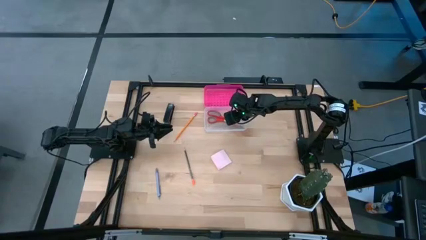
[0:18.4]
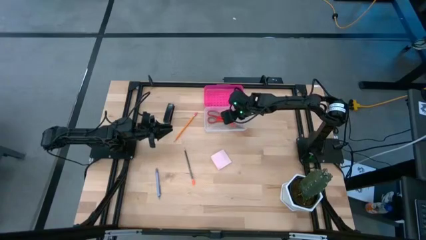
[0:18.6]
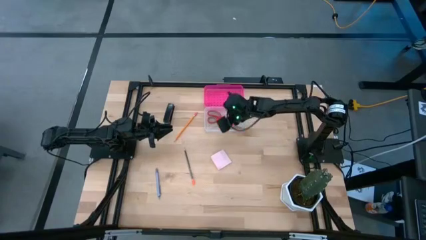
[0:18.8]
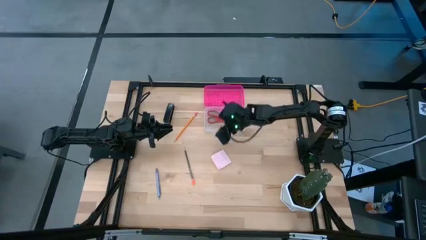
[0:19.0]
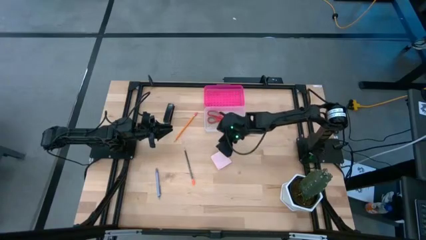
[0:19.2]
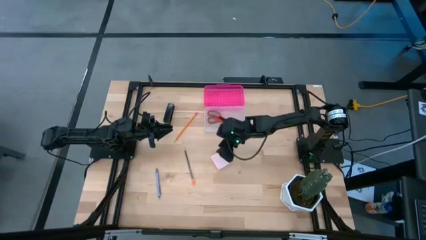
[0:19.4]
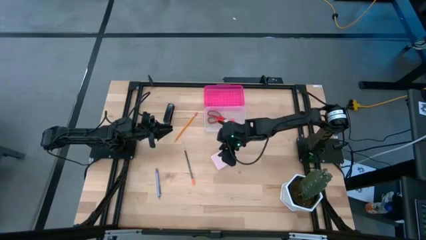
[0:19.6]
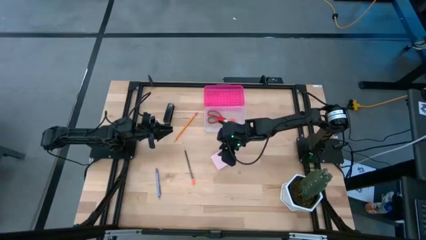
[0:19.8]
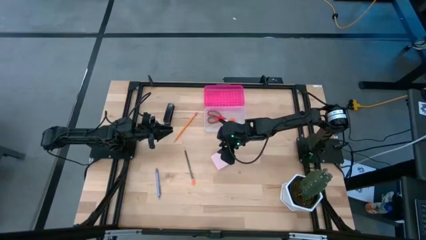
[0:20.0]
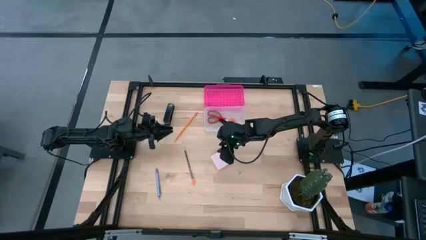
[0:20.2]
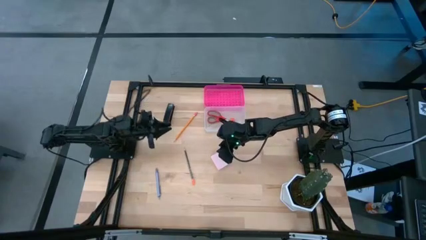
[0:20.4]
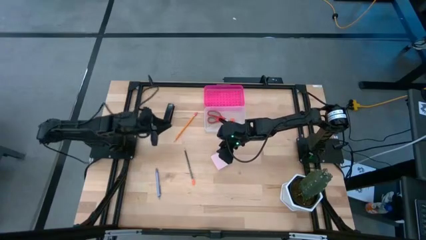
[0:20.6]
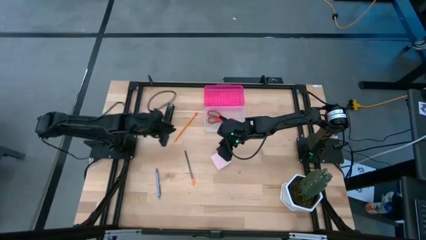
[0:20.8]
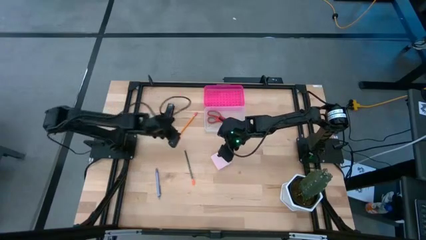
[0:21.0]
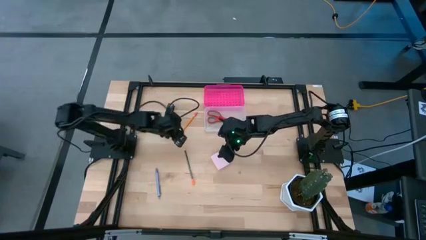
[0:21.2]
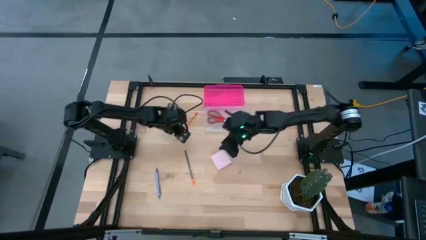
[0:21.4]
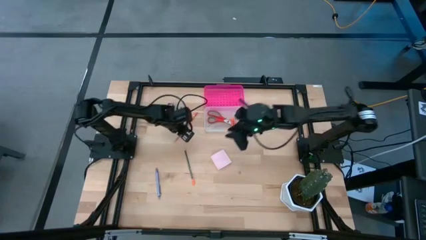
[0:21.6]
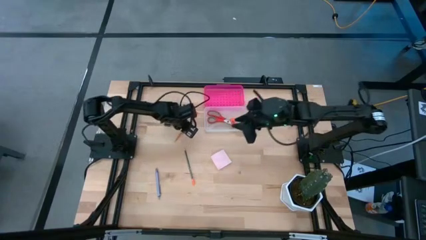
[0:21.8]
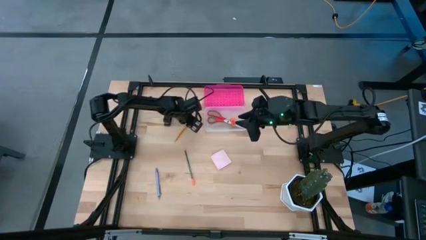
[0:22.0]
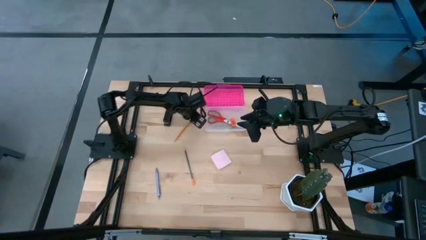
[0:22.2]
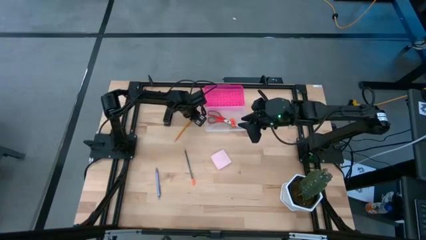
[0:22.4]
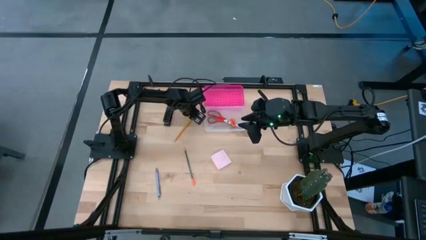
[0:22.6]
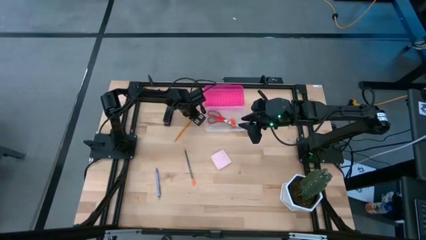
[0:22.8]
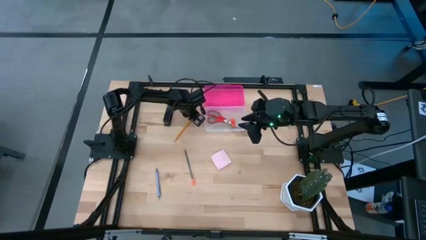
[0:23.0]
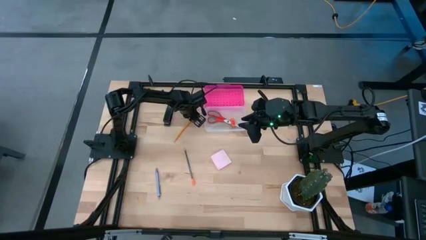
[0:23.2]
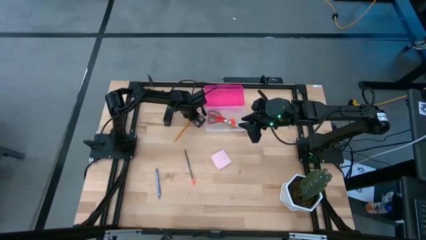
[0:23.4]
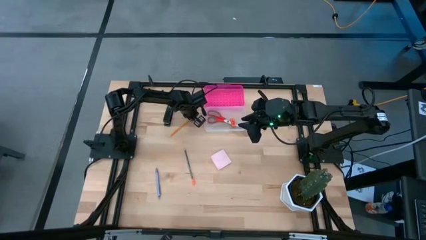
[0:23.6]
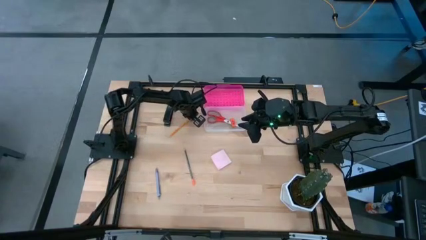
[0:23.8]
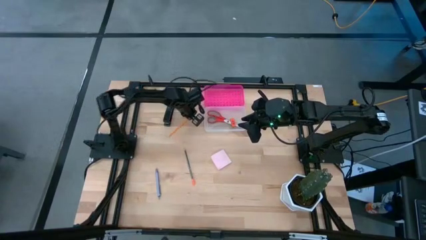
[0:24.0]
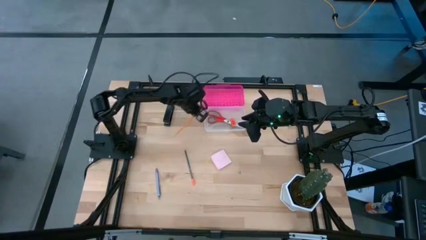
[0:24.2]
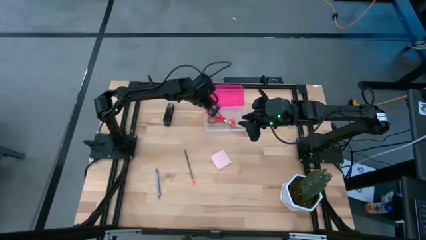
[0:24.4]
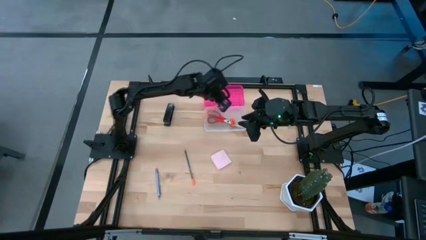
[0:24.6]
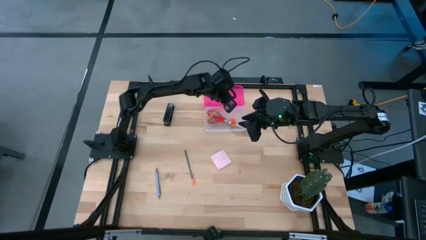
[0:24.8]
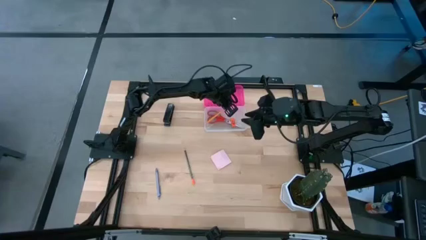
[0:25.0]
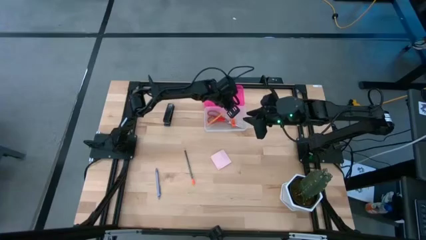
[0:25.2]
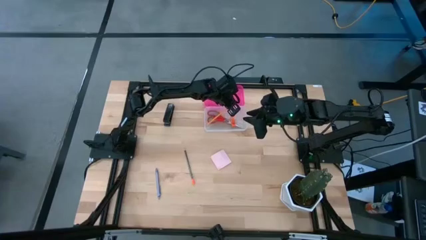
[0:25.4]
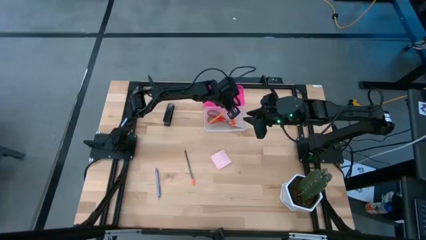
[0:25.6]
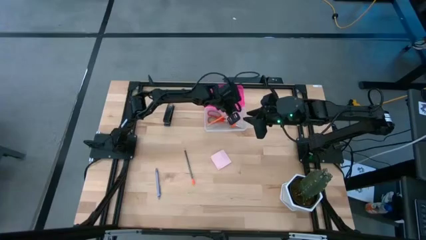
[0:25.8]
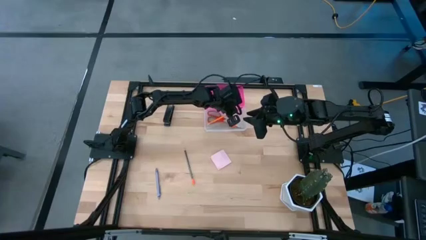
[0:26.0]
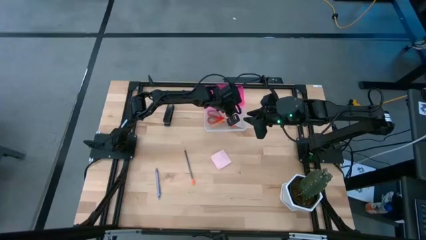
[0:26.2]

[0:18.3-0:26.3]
Task: Pack school essentials
Put the yellow pencil into the supply box

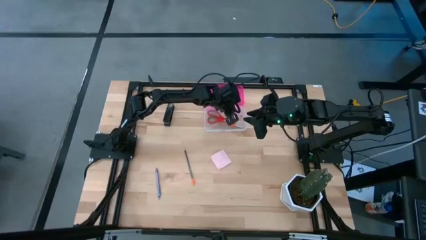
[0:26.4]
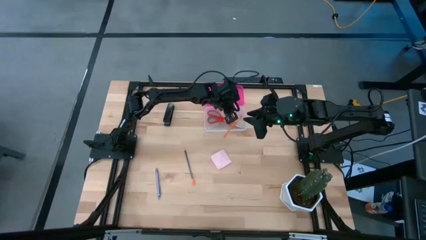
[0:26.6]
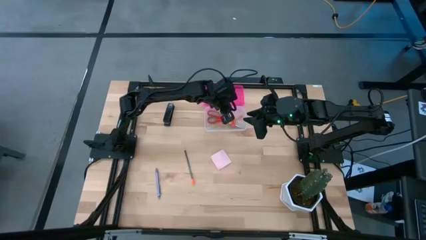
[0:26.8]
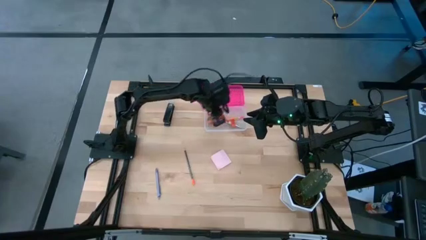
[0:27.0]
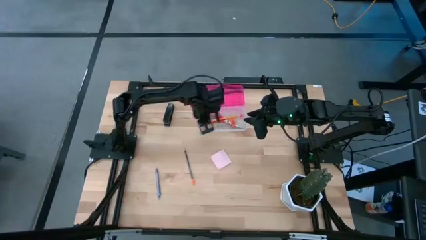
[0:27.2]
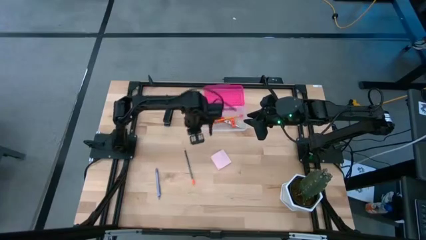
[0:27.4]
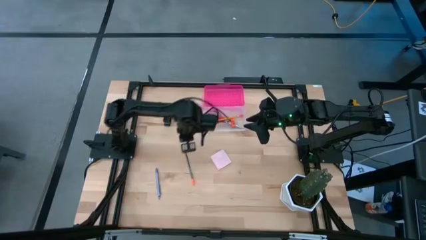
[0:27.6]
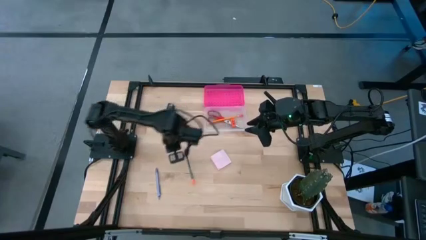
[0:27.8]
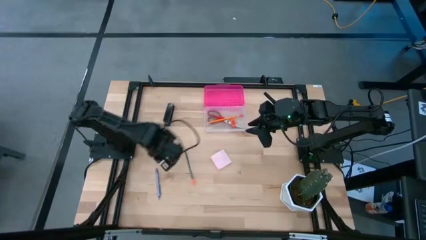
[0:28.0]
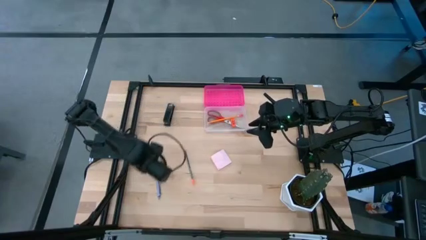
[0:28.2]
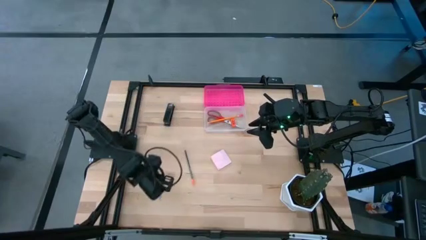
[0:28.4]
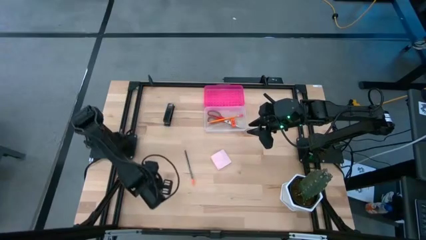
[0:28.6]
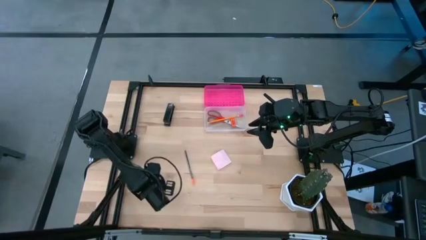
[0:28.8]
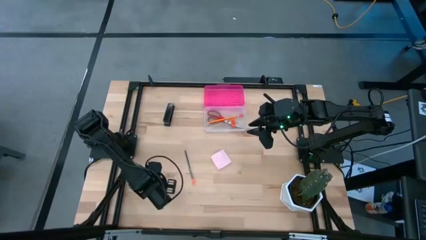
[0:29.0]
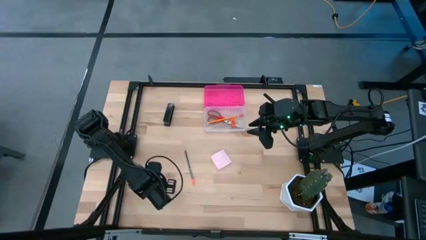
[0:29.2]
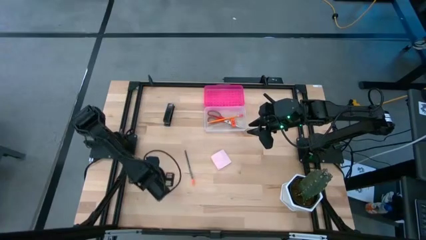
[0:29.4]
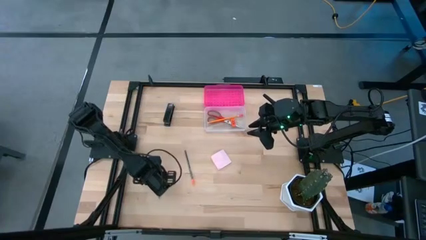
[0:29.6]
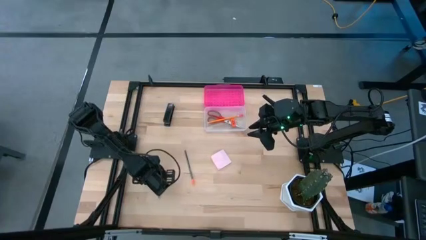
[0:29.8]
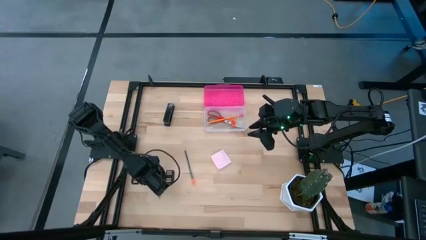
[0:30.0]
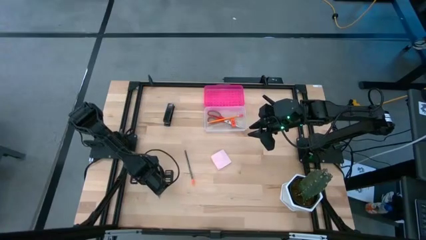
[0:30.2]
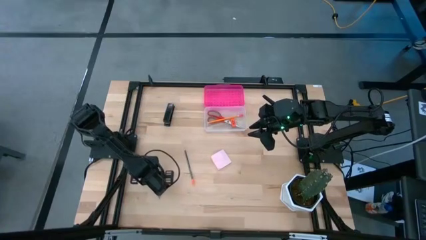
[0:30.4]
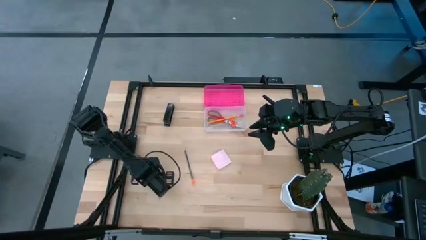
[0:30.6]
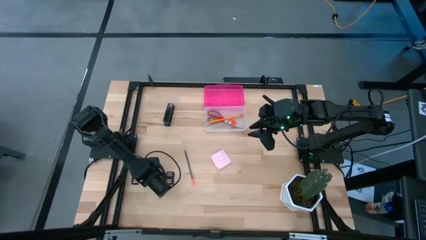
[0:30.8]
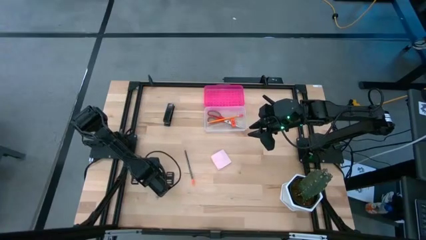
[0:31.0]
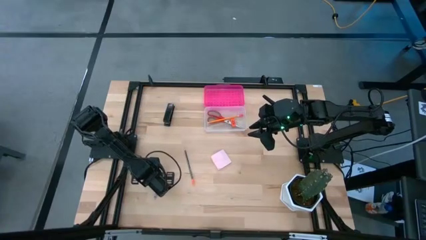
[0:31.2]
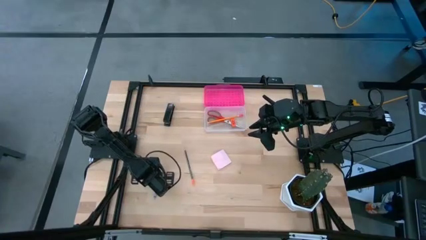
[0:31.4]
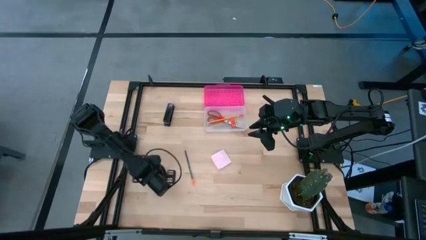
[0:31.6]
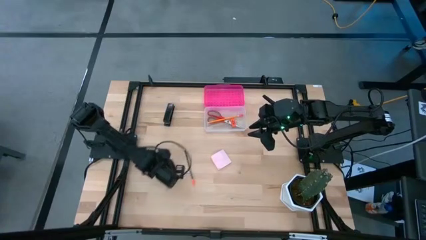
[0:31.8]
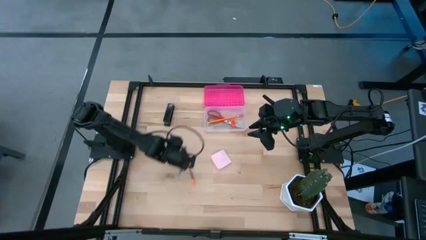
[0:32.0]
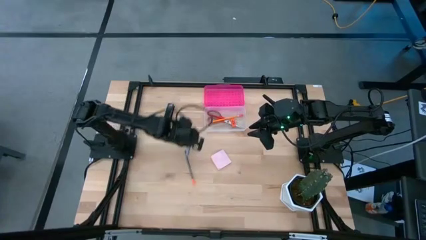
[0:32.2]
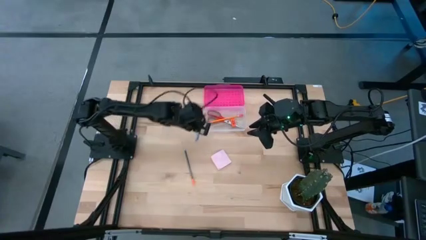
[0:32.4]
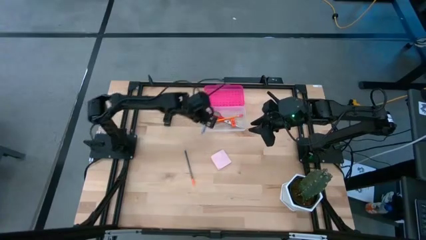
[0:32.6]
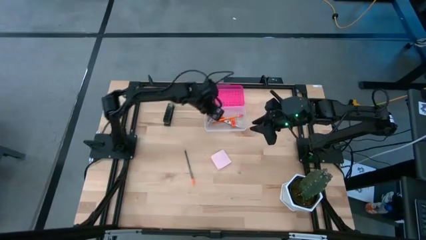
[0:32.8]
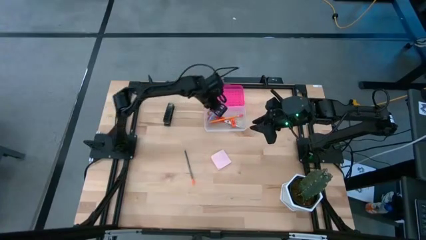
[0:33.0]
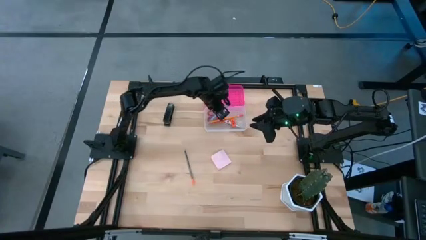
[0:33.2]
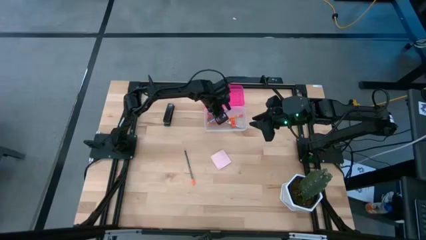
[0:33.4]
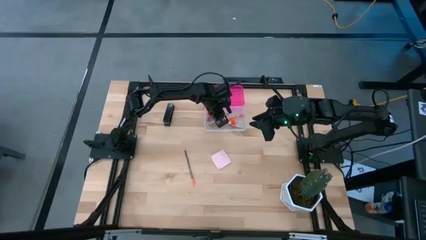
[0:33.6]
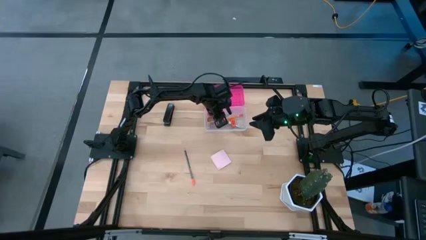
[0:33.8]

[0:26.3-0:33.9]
Put the gray pen into the supply box

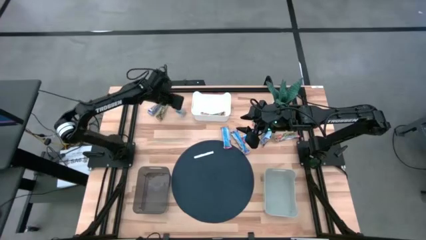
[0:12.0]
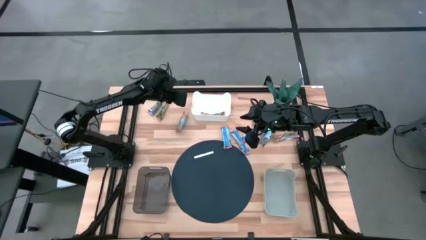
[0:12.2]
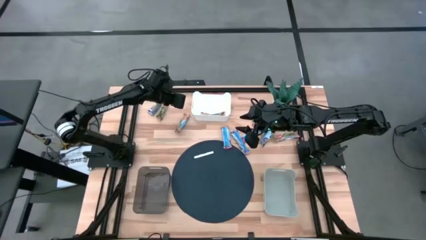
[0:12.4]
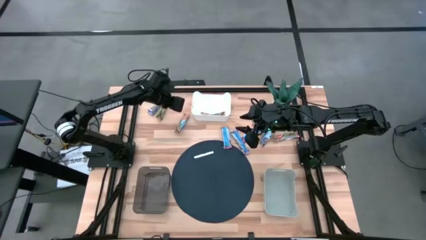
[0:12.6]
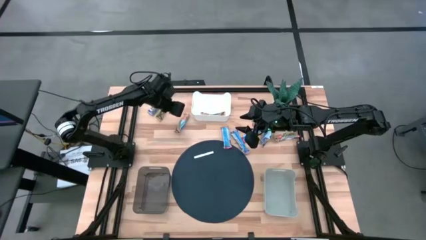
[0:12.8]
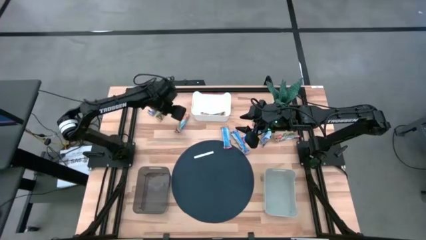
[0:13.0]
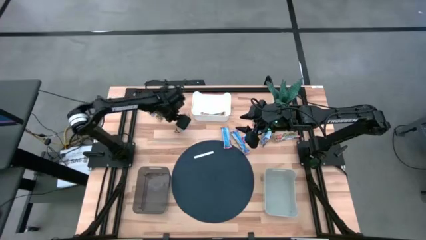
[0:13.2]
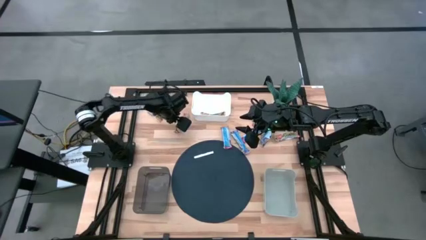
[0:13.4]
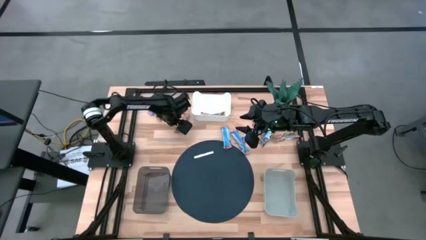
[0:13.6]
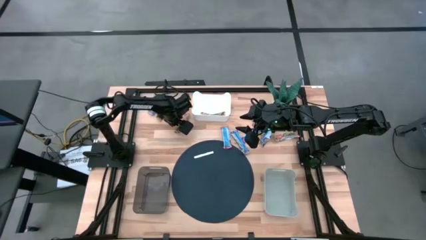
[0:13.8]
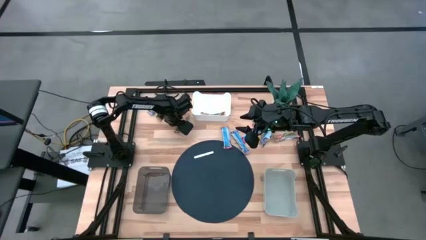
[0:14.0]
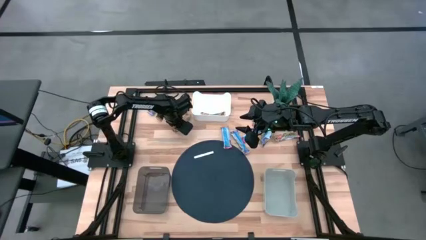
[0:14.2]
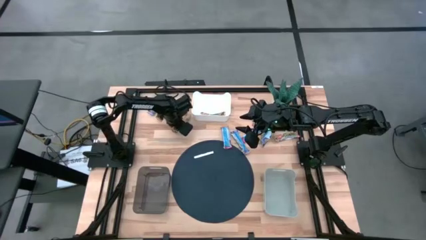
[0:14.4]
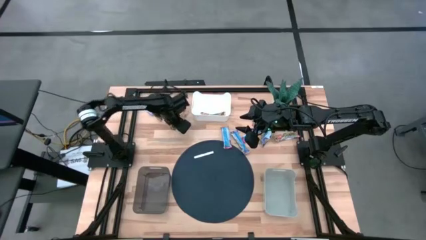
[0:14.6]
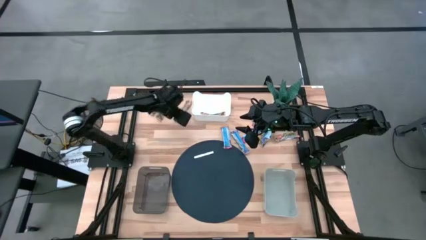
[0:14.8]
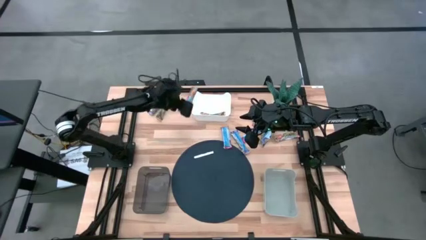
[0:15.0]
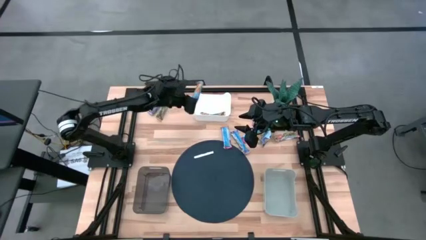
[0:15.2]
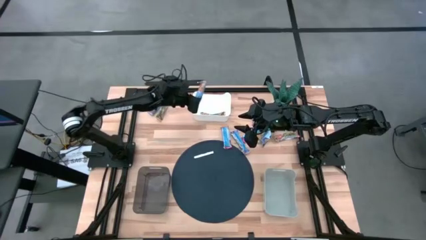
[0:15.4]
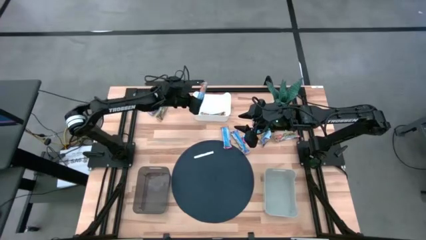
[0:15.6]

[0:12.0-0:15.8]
Task: Pick and place Granola Bars by type
Put the yellow granola bar into the white bin
